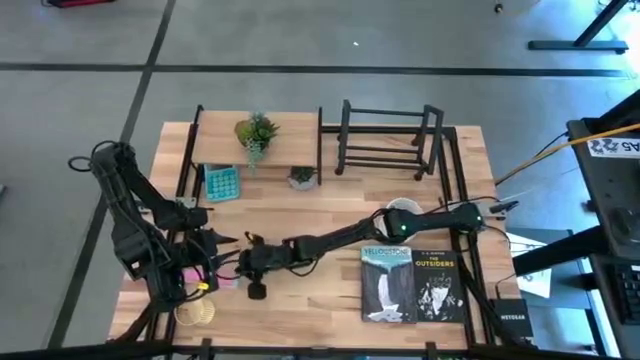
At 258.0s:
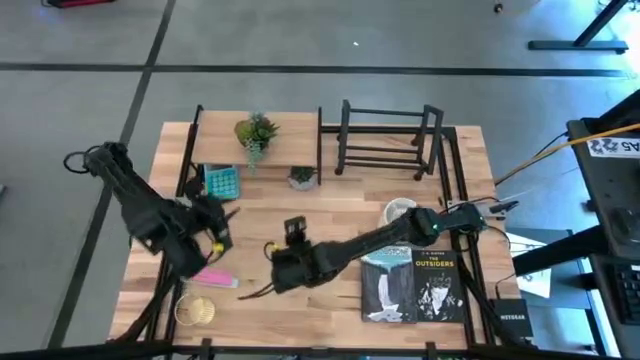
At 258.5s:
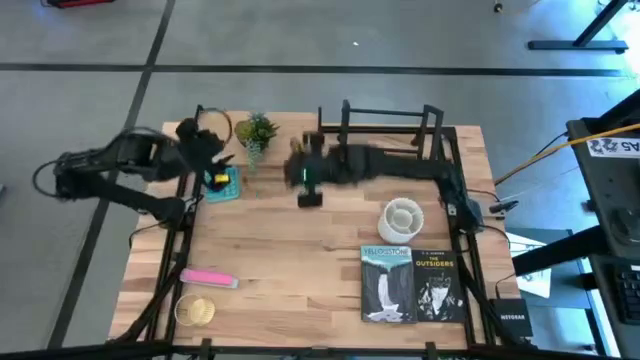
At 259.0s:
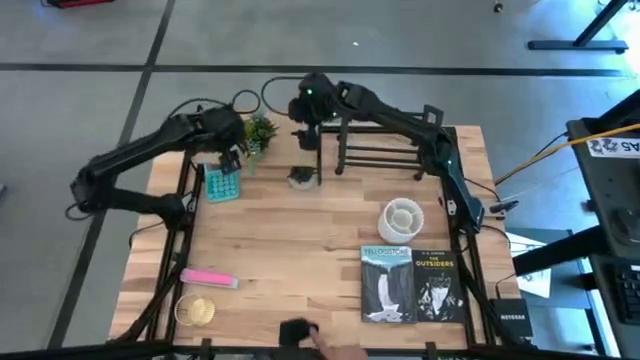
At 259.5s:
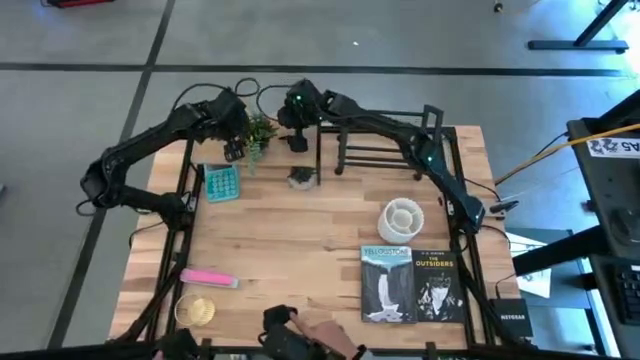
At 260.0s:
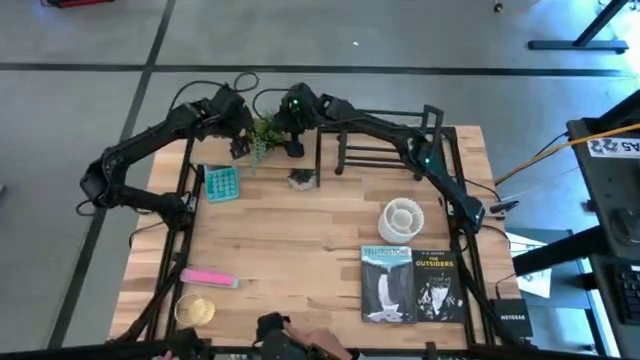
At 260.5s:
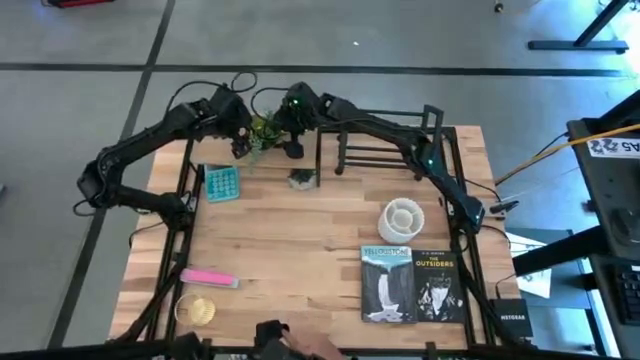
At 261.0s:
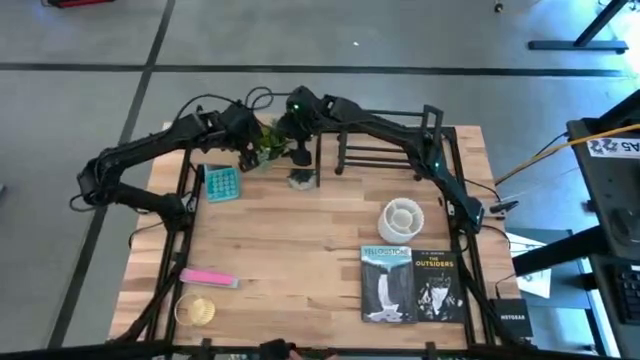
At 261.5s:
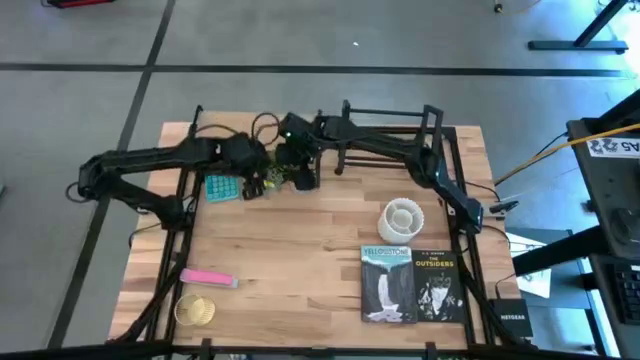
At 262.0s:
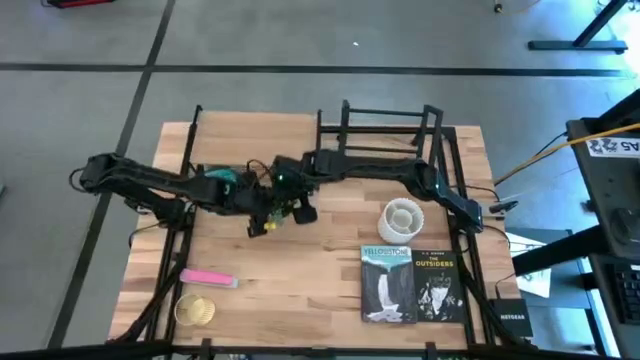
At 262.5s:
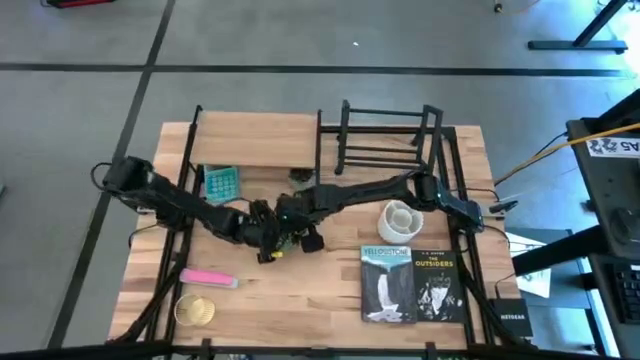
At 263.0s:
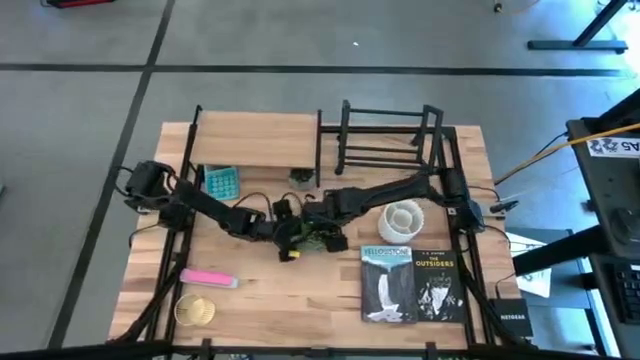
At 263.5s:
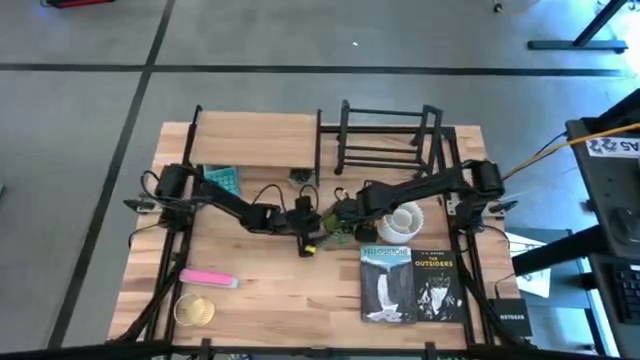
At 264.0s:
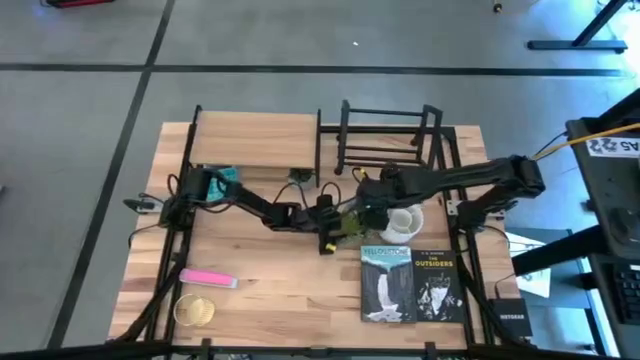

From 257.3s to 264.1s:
Task: Stock shelves
Remove the black plant vase from the shelf

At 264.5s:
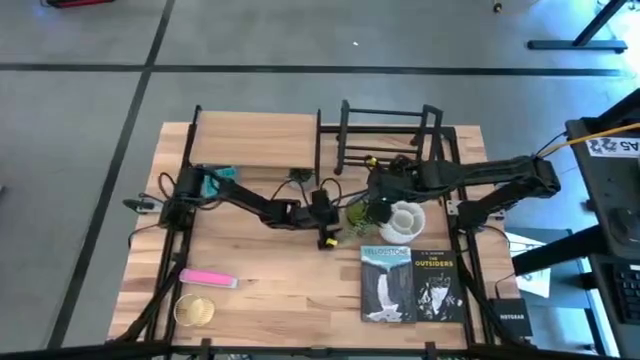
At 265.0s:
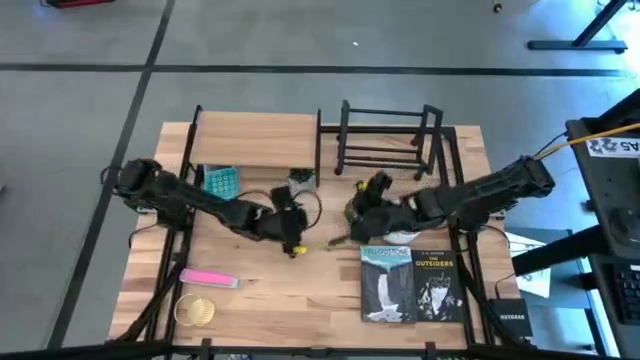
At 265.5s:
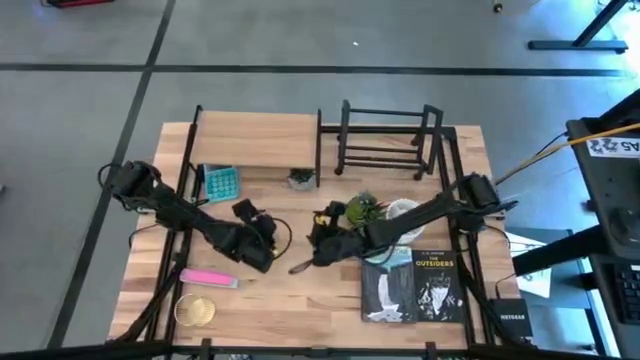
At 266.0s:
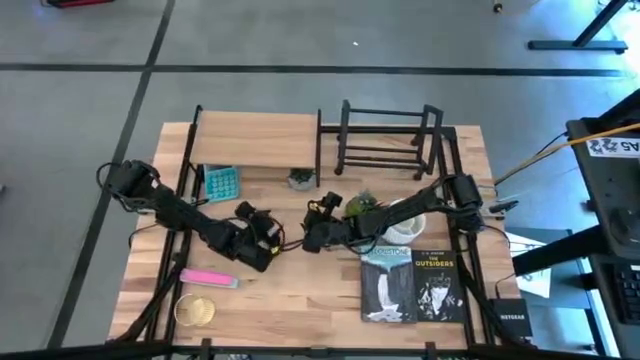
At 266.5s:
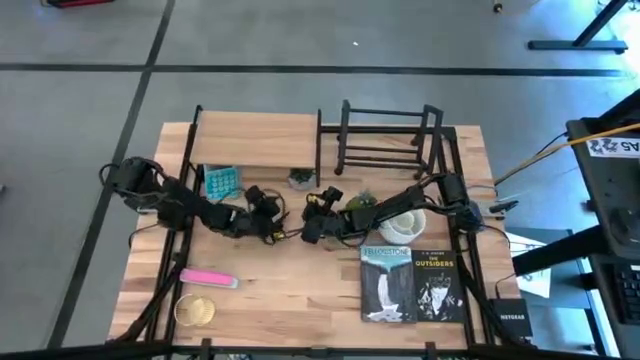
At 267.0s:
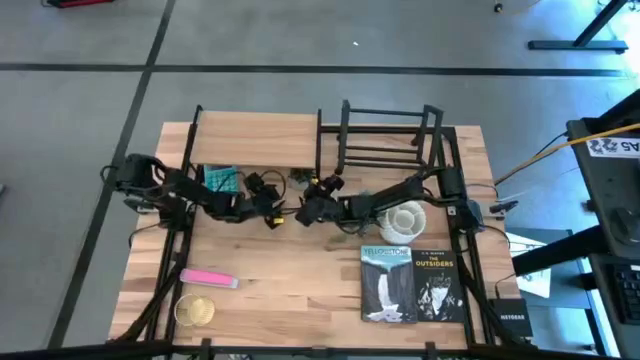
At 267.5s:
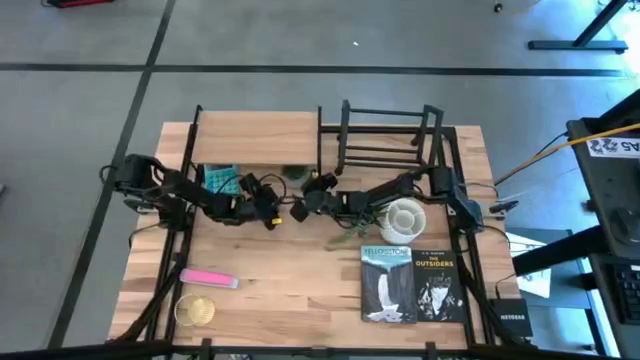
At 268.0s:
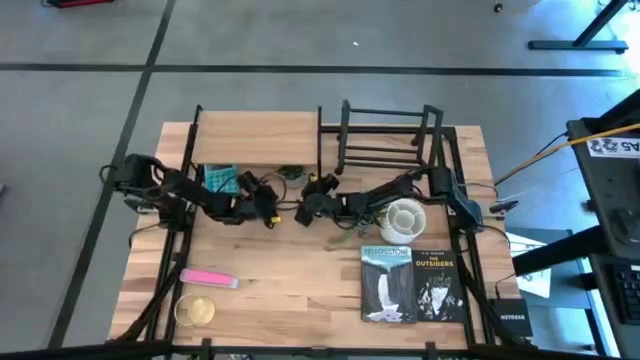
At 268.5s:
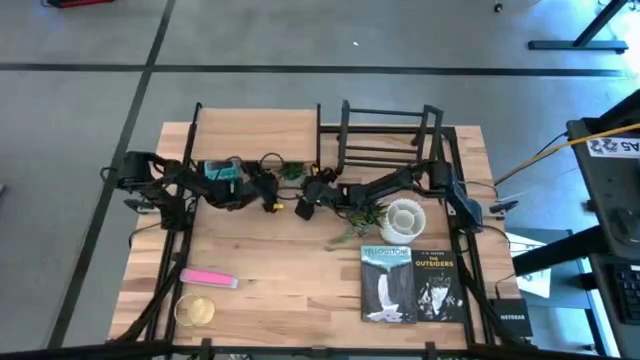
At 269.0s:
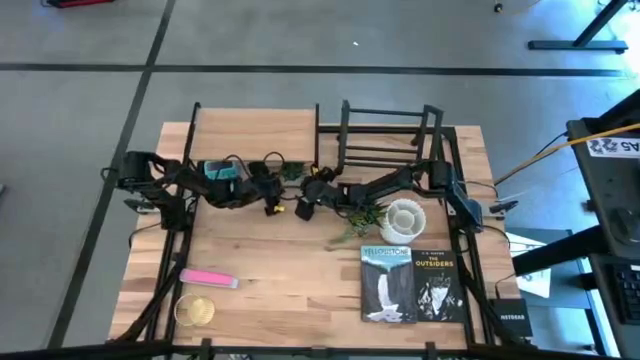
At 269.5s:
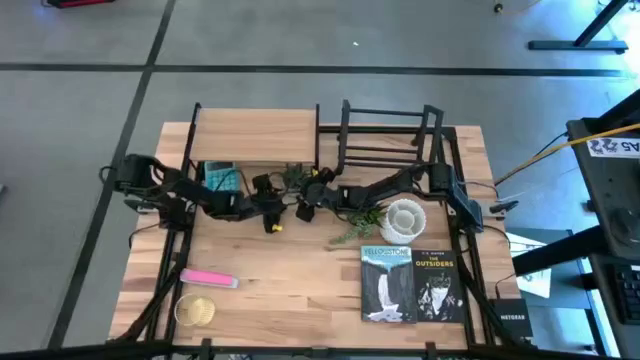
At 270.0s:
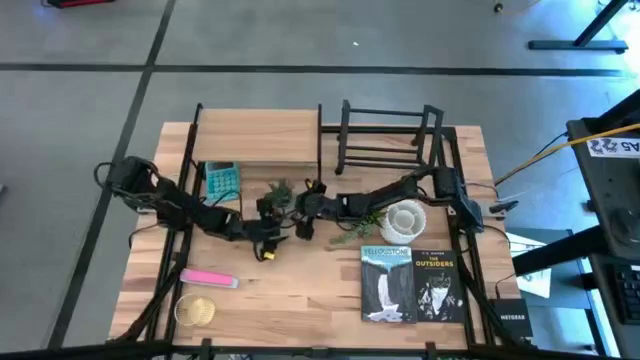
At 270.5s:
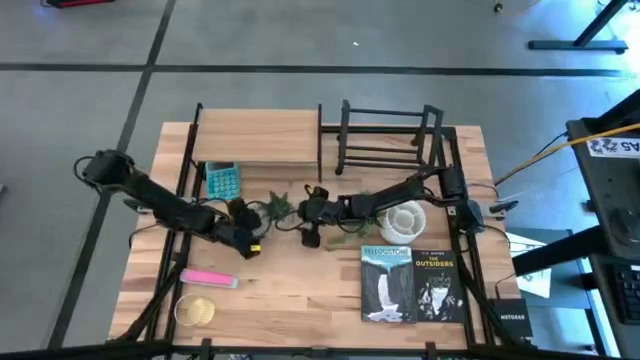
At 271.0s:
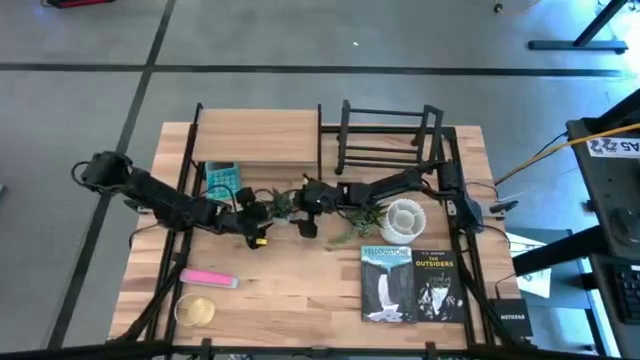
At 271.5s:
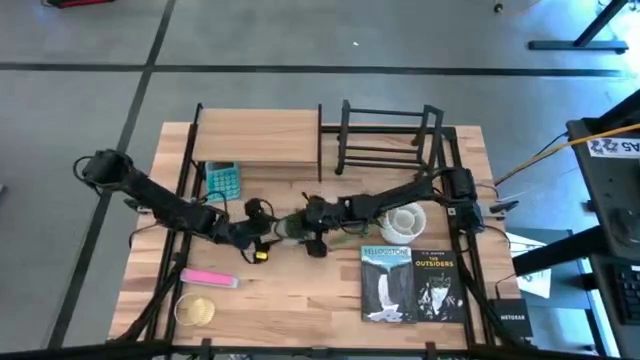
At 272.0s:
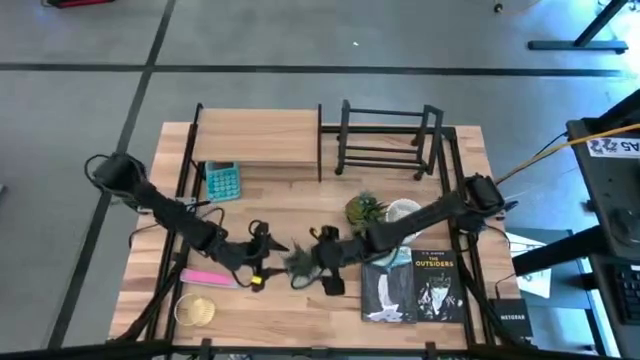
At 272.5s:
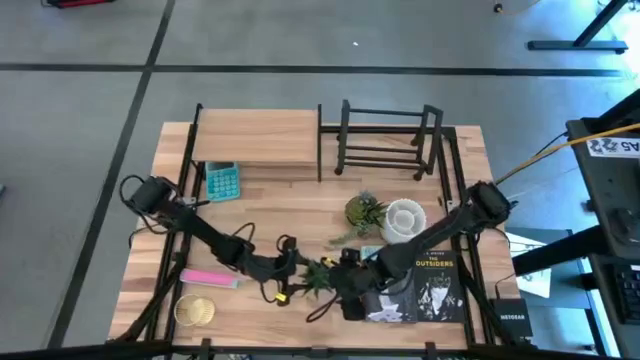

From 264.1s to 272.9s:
Move the gray plant vase to the bottom center of the table

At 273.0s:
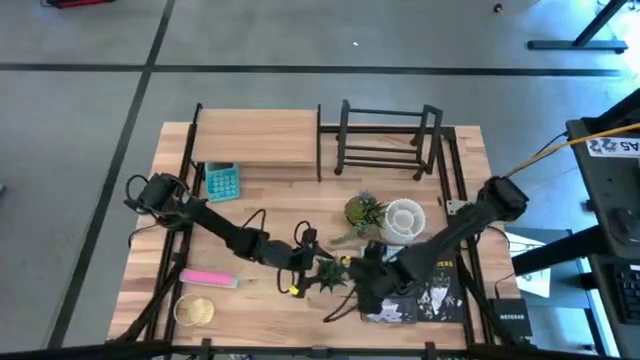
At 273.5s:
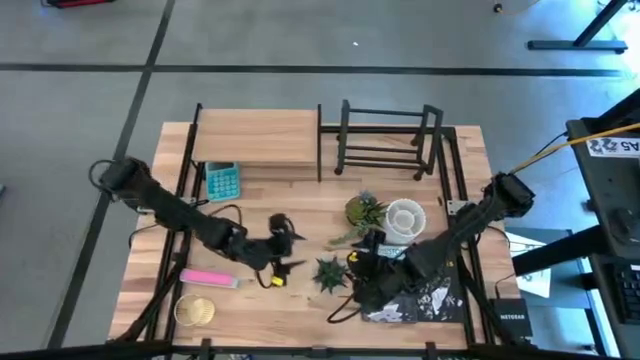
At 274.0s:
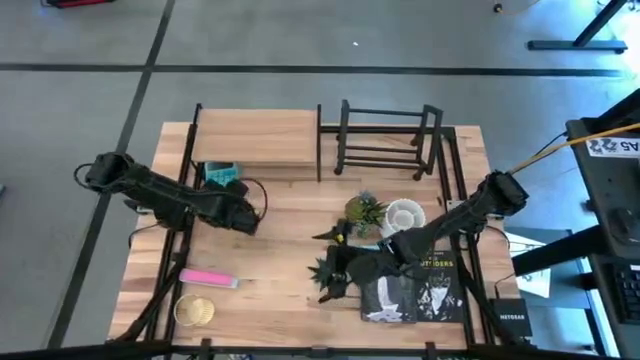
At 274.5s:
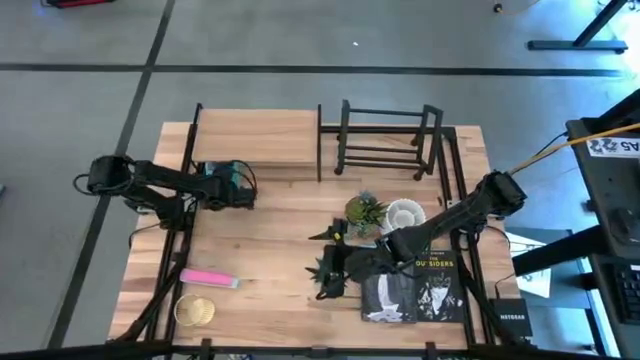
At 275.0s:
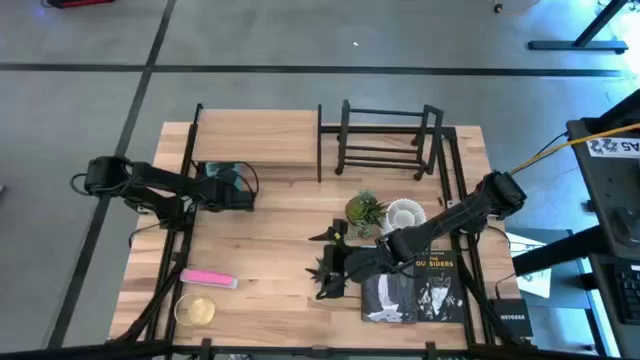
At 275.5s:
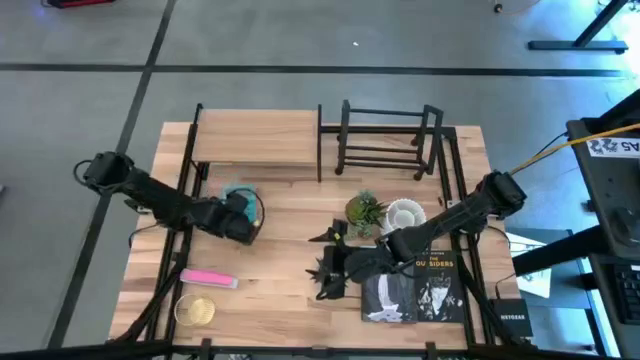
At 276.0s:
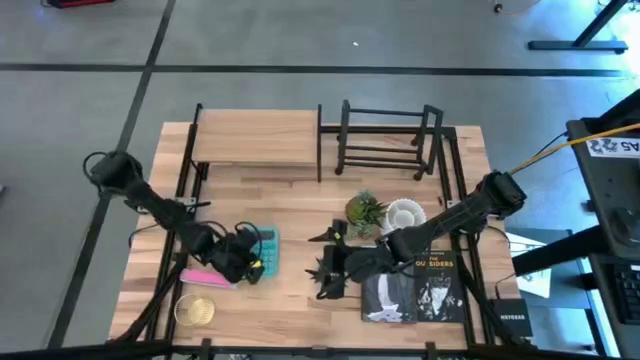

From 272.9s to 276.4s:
Move the blue calculator to the middle left of the table

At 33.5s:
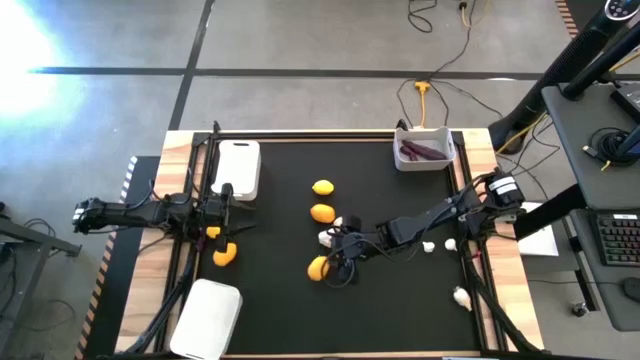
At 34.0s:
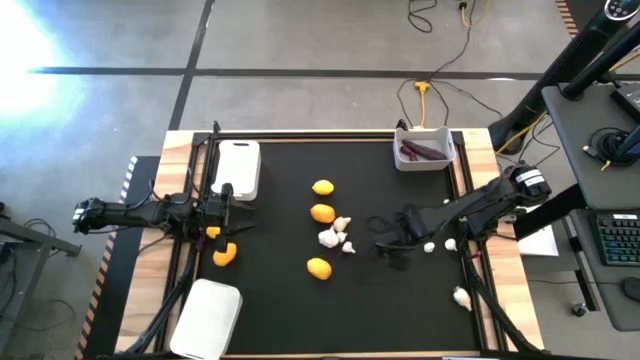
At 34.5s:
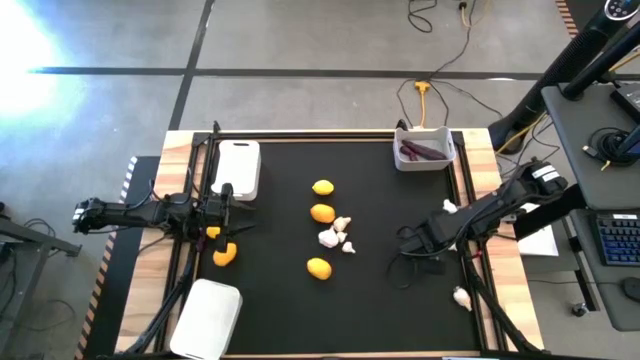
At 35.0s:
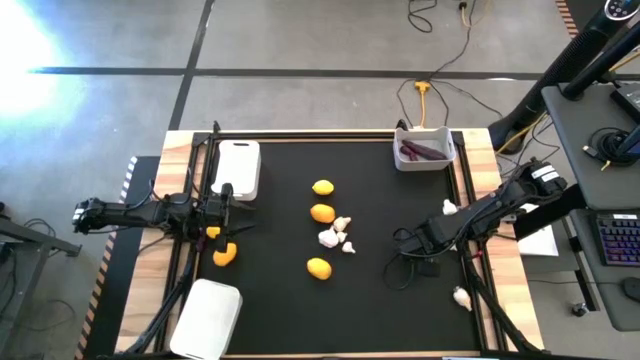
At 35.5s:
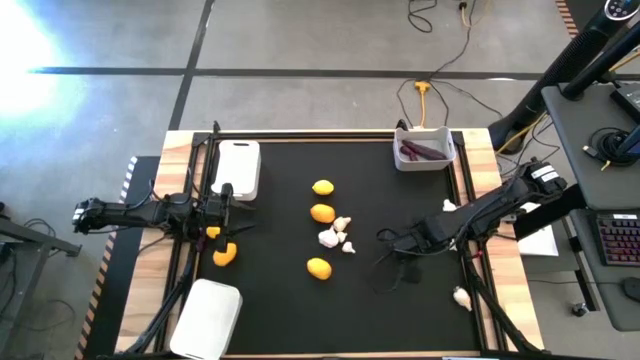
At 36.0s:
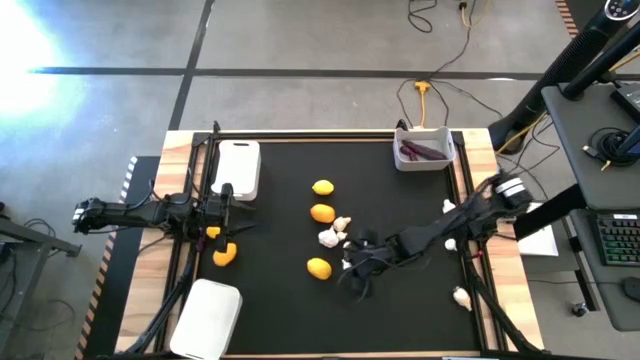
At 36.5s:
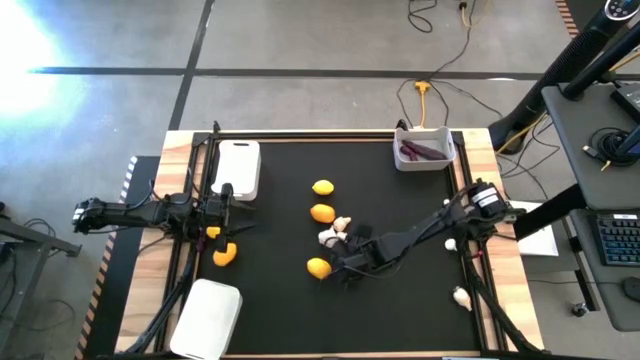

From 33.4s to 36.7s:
Task: Sort produce into baskets
Move the garlic to the center of the table
